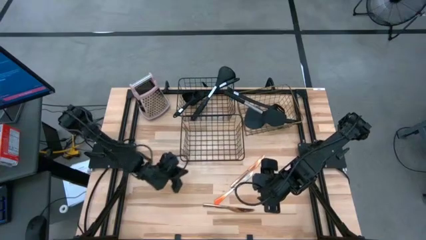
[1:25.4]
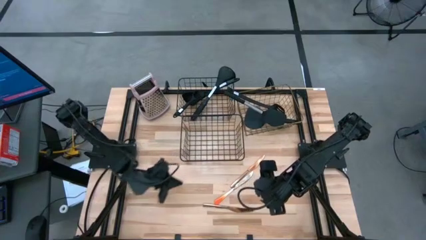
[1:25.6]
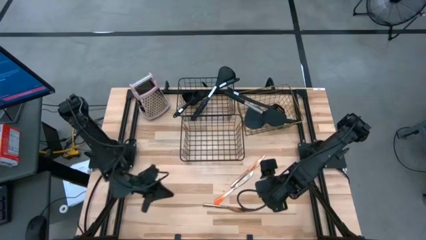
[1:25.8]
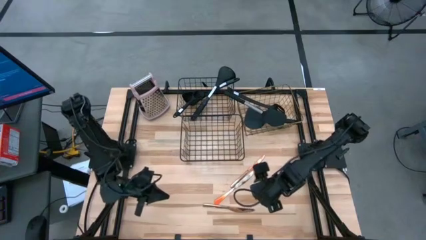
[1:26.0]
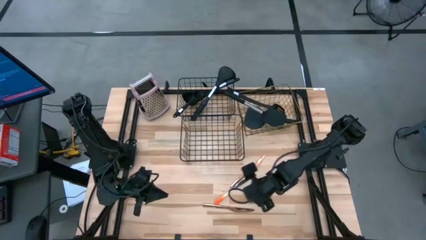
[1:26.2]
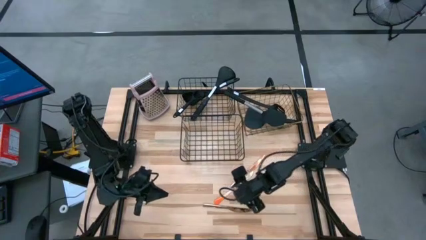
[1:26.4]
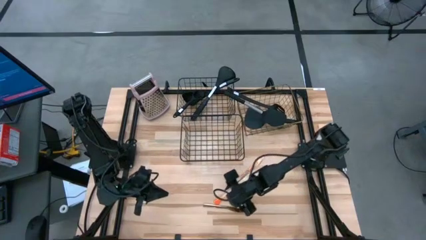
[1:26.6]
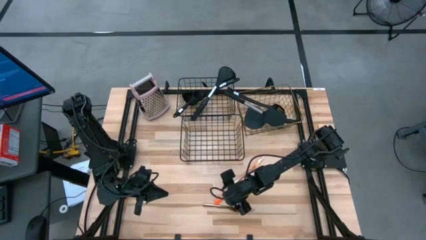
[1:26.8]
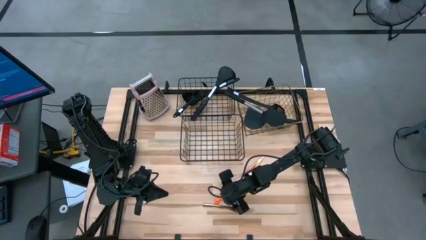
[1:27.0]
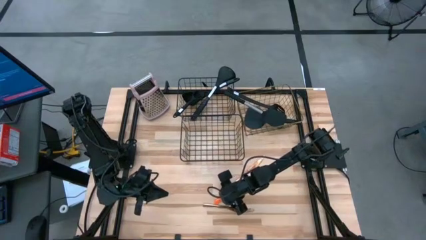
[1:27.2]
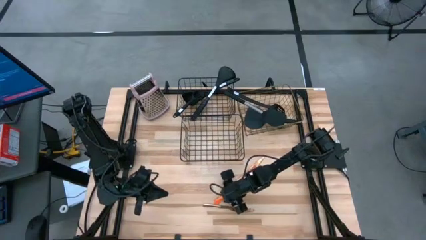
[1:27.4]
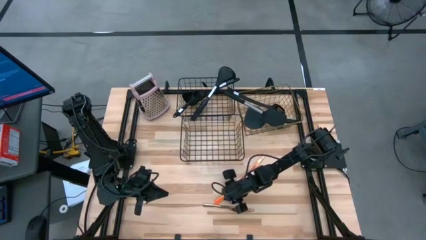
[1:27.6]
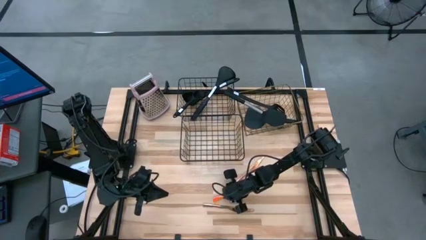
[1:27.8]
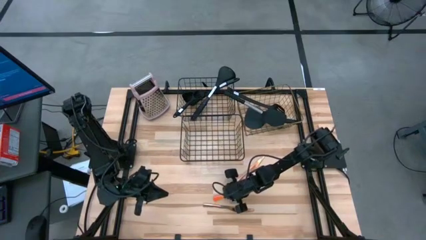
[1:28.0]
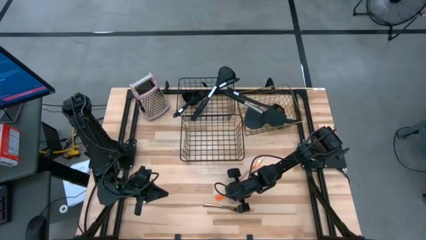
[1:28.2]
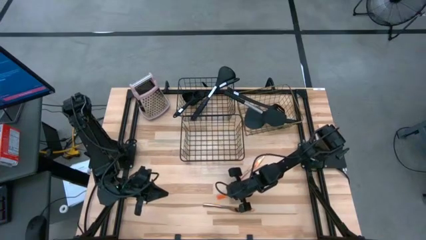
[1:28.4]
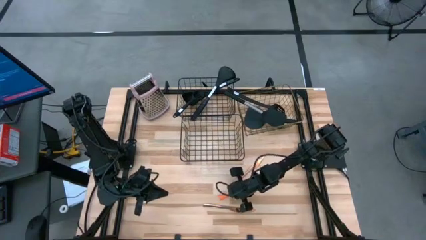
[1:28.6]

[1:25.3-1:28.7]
Task: Pick & Place Kitchen Items
Put the table knife into the bottom wire basket

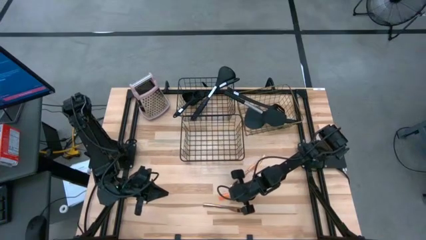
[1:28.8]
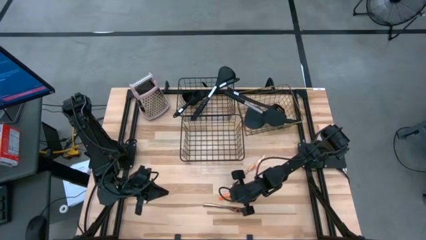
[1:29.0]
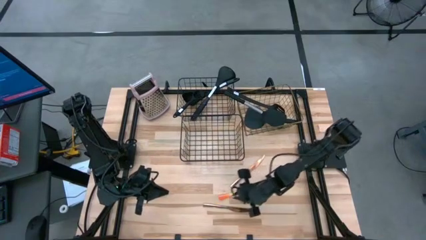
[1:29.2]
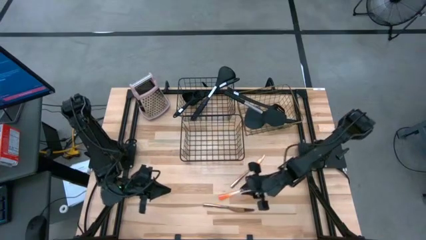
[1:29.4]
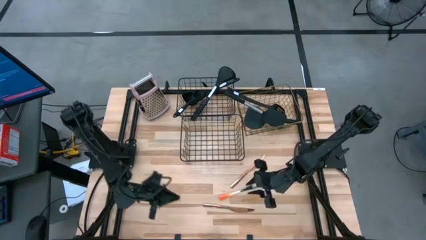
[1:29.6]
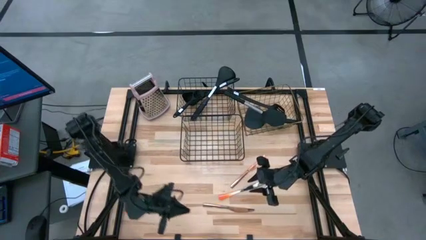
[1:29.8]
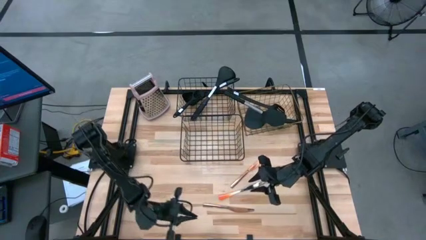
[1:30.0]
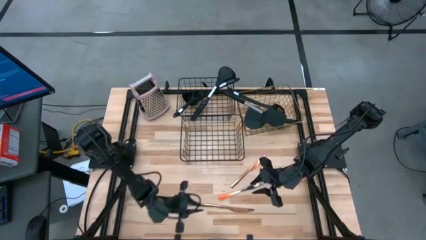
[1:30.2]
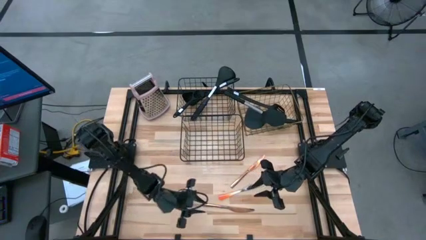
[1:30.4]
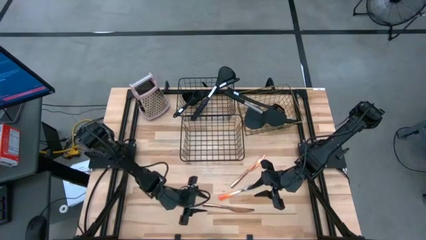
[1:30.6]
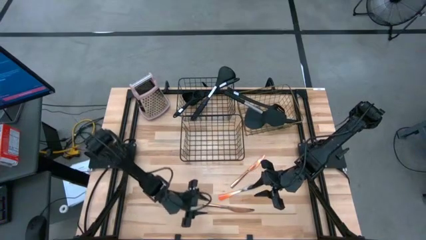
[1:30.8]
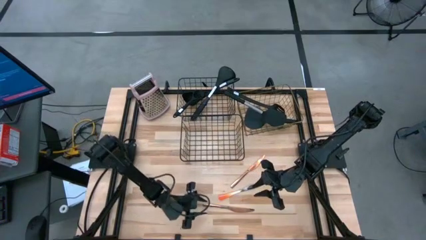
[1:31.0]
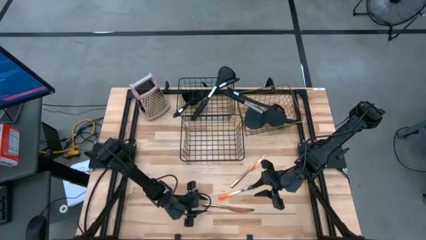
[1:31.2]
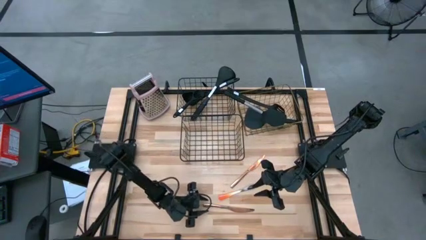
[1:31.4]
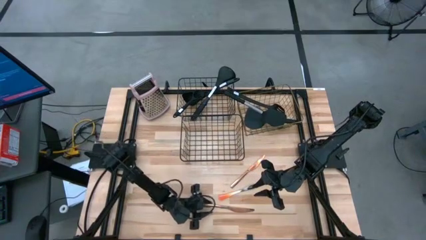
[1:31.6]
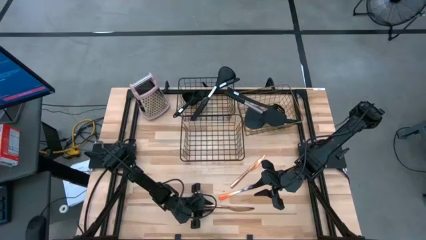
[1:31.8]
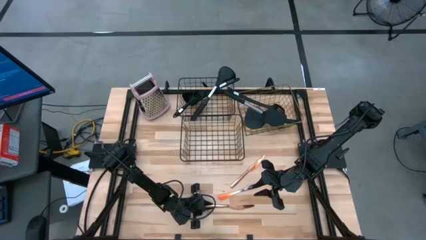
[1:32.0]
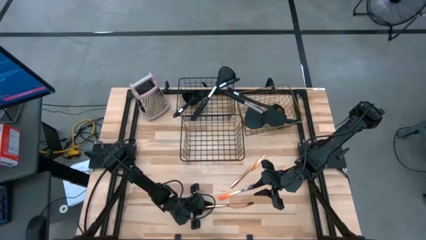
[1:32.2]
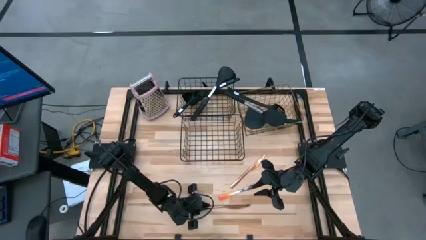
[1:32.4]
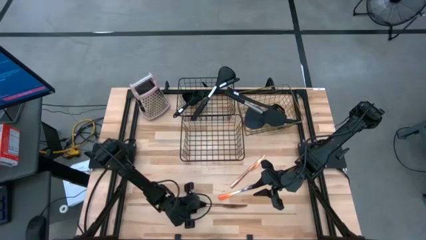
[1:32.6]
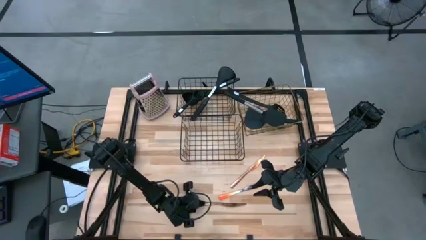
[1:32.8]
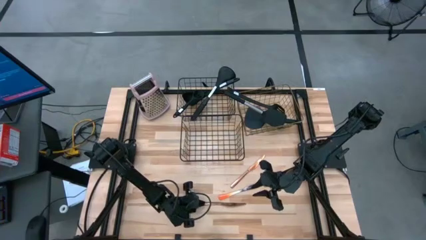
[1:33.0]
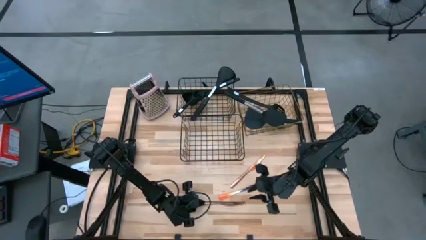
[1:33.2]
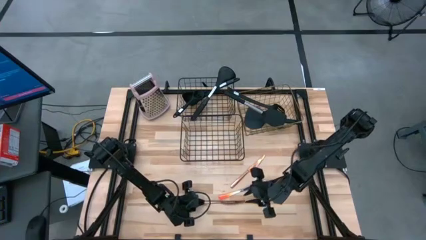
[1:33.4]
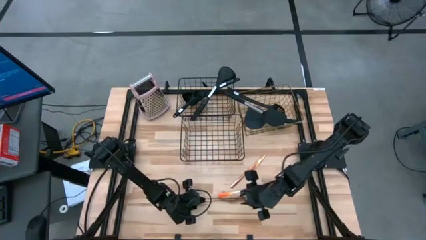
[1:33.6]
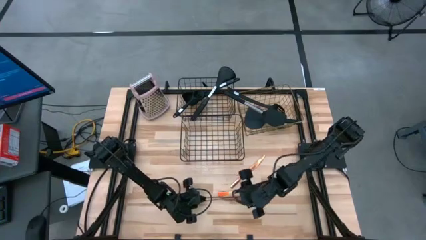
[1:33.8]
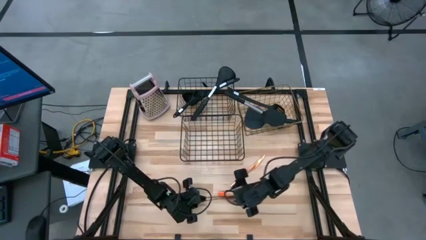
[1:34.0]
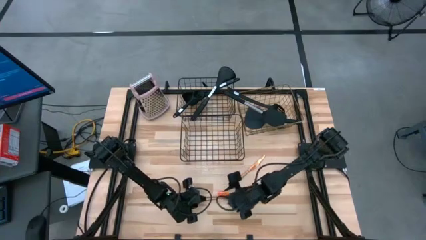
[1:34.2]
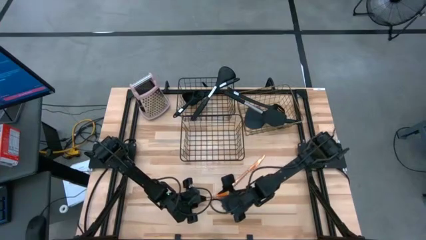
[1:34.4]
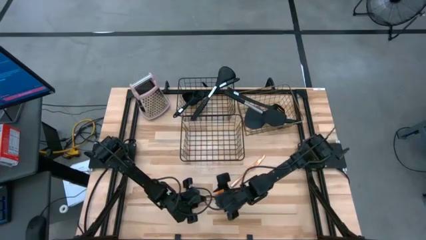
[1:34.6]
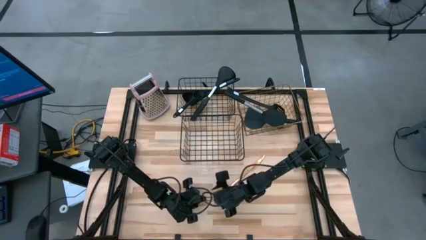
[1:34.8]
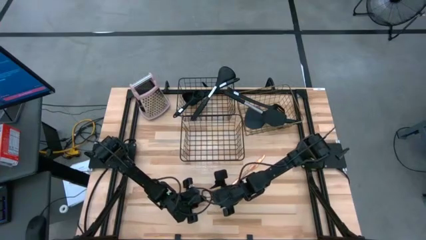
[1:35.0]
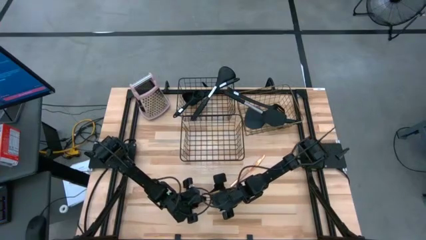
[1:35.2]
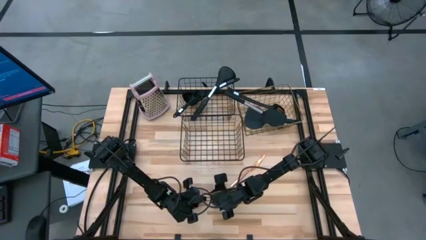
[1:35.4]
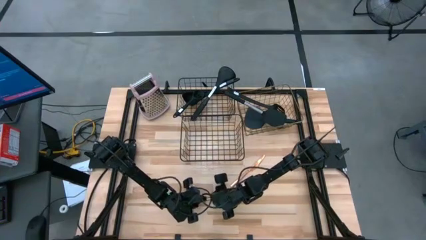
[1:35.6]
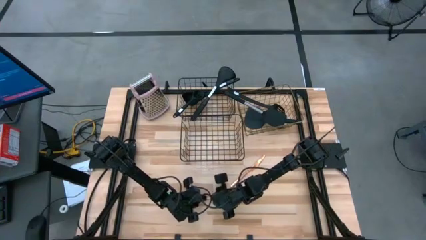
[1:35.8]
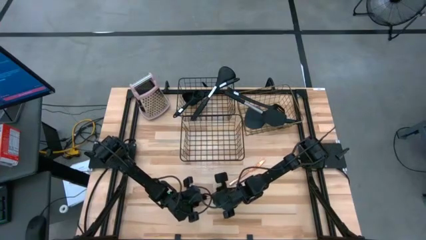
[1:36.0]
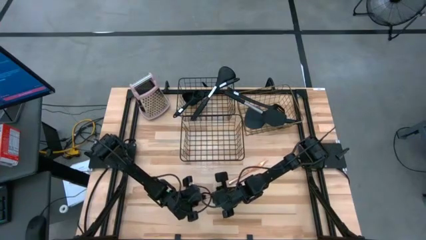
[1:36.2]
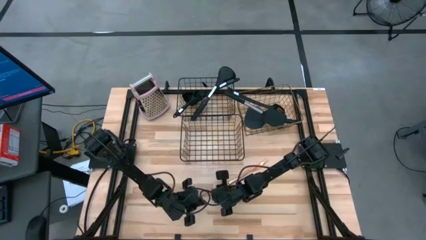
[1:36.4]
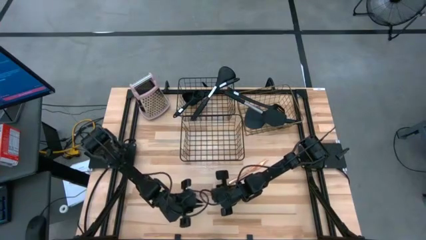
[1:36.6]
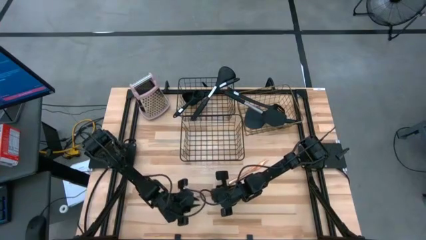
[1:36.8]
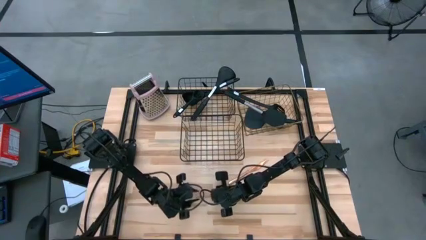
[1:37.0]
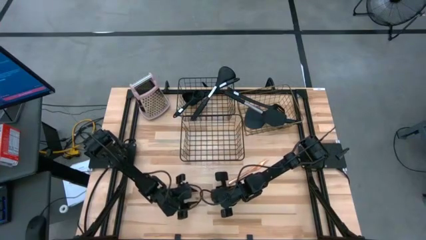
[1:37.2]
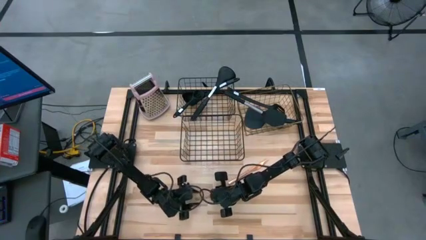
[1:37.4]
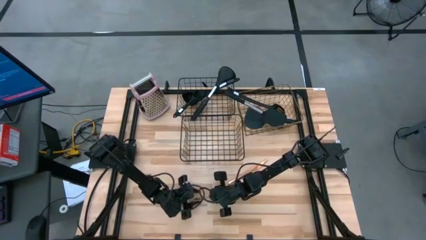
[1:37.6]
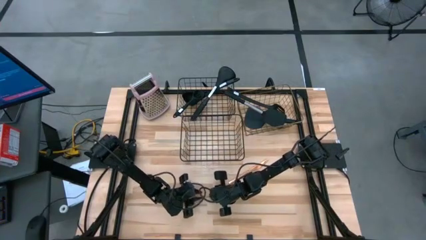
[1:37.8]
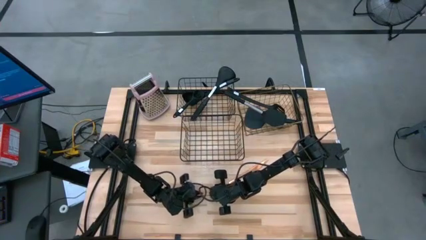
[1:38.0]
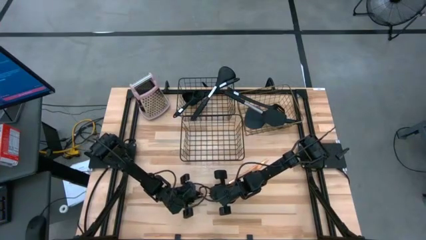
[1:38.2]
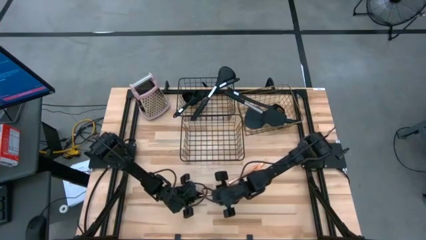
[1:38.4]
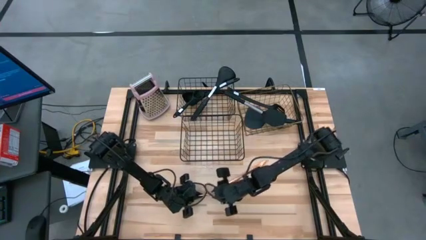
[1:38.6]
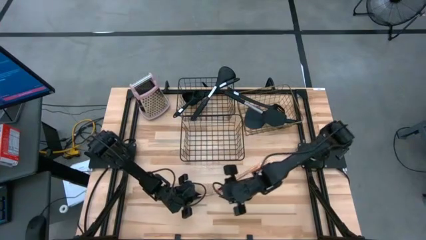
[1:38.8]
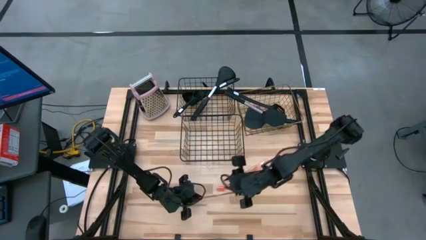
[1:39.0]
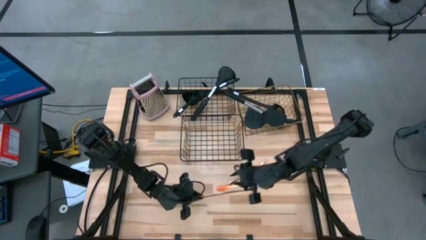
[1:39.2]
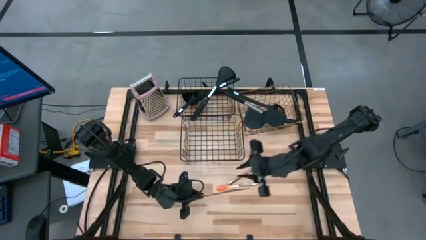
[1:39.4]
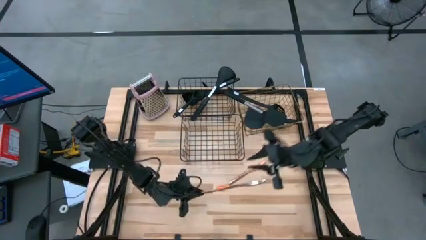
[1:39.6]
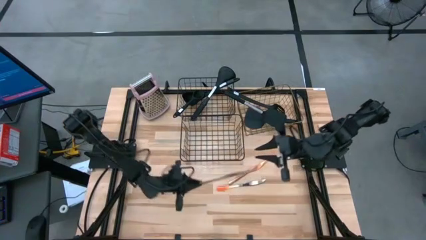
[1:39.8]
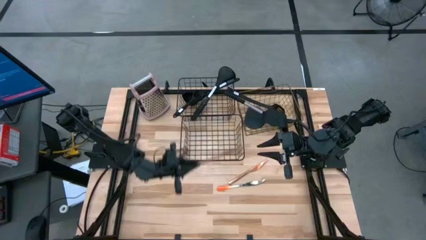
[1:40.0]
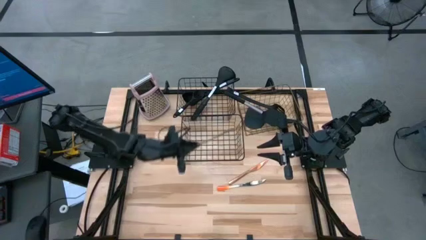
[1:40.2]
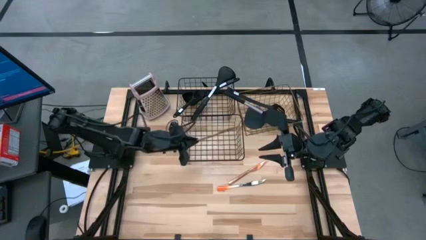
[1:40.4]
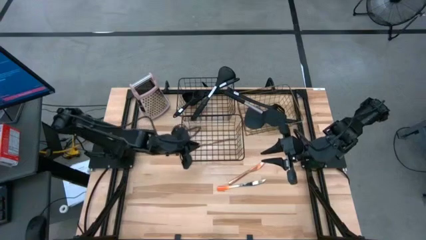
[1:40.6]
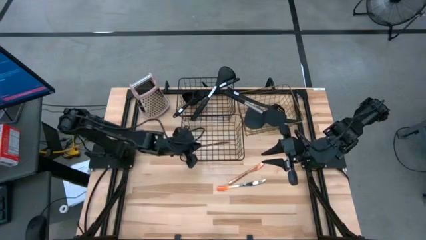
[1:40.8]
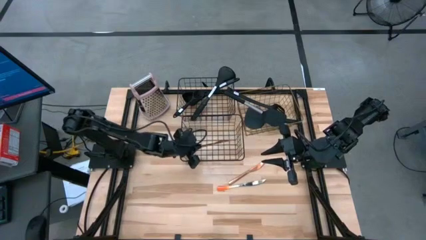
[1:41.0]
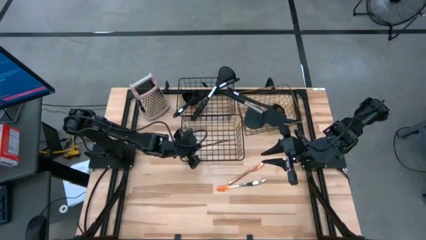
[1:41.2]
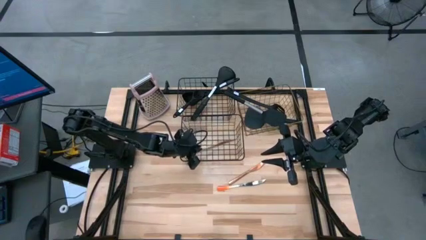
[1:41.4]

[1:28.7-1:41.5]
Put the table knife into the bottom wire basket

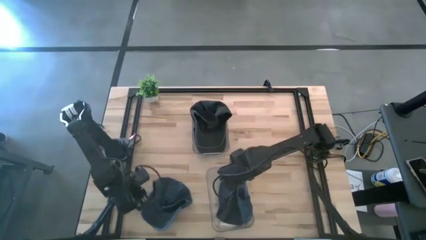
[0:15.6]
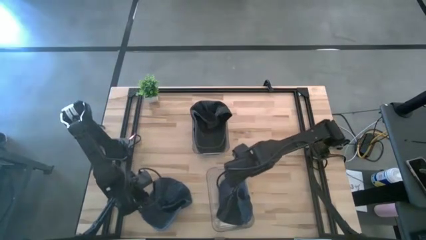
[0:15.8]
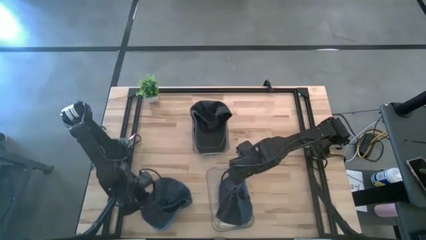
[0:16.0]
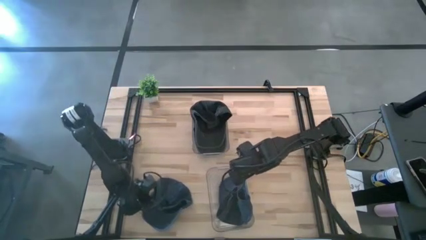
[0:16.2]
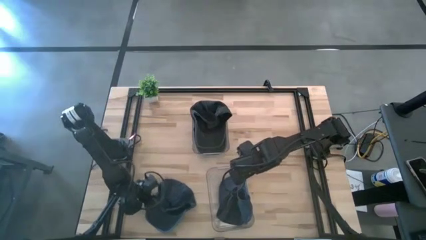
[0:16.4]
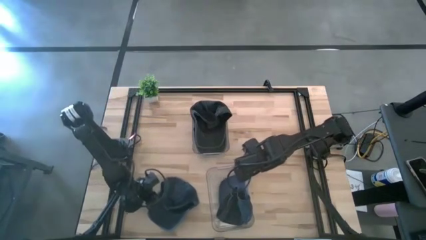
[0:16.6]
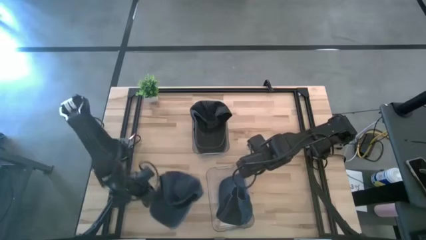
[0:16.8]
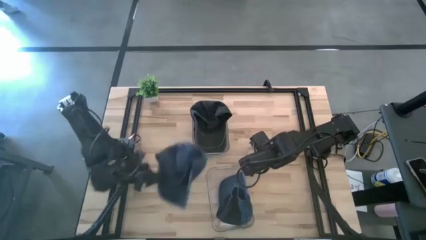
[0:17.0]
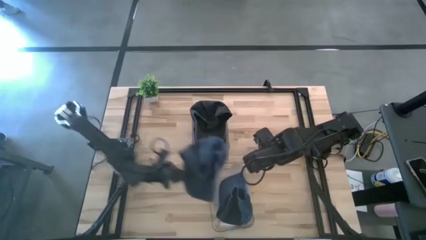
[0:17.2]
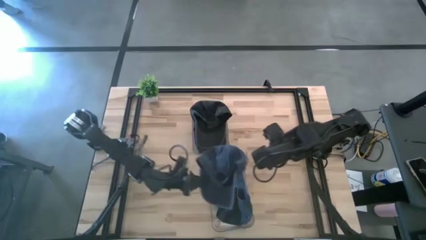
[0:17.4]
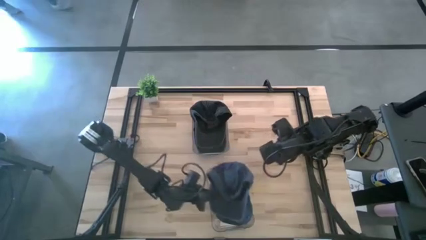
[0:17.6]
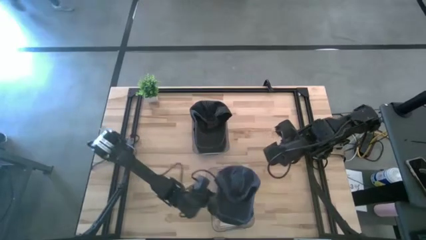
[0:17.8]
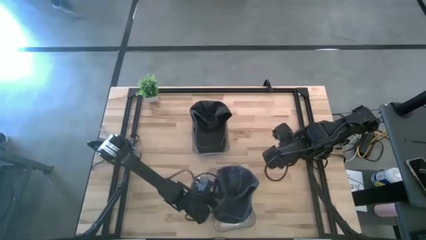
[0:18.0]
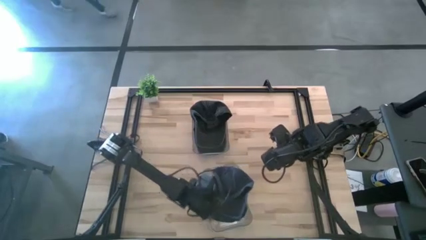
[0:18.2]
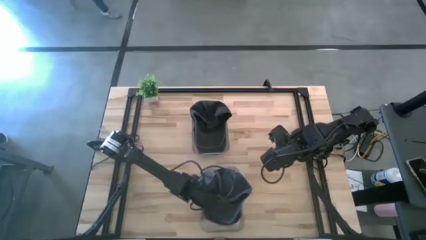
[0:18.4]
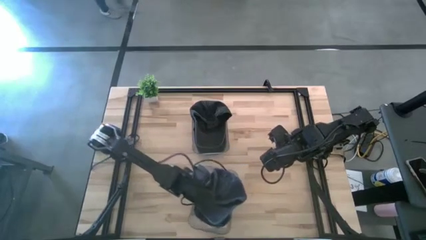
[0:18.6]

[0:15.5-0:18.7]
Task: Pick & Place hat
Put the gray cap into the bottom transparent bin
